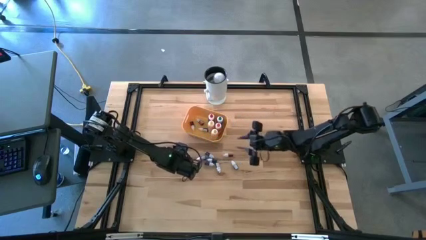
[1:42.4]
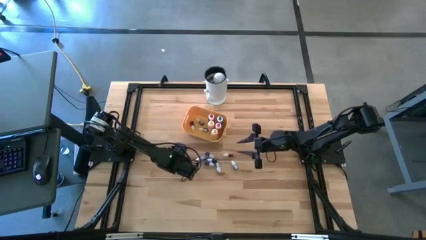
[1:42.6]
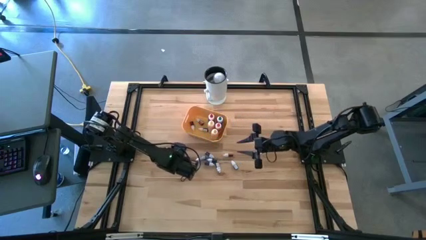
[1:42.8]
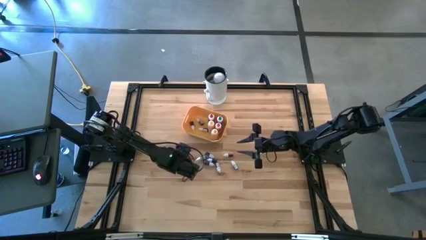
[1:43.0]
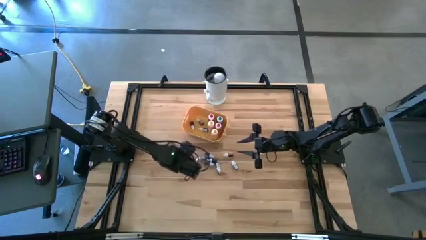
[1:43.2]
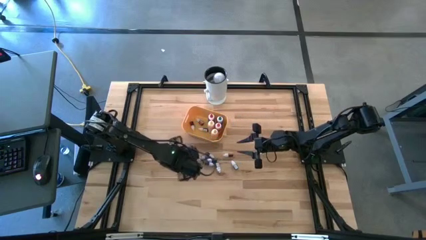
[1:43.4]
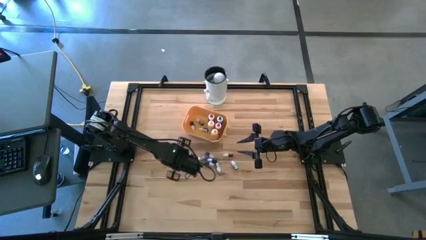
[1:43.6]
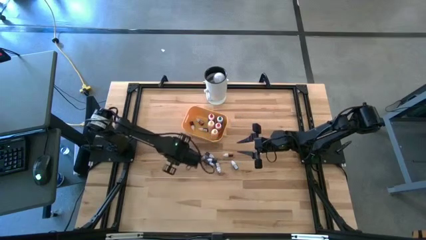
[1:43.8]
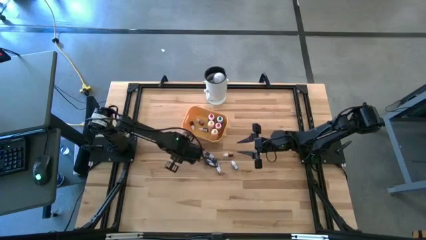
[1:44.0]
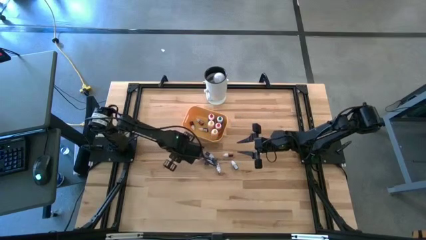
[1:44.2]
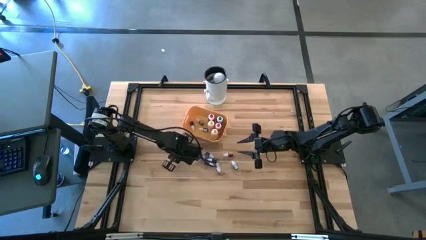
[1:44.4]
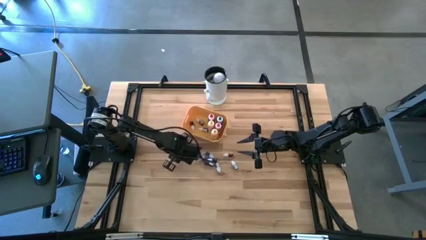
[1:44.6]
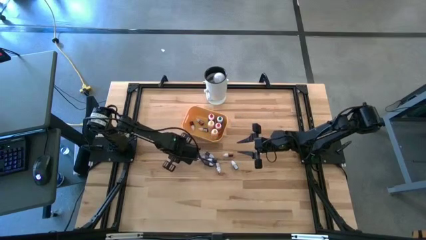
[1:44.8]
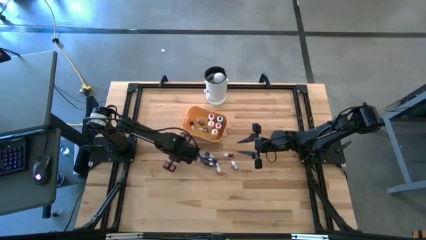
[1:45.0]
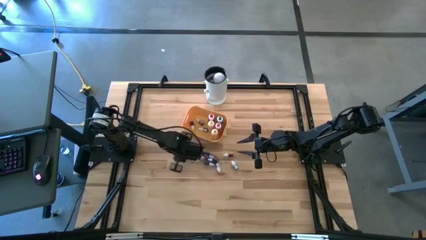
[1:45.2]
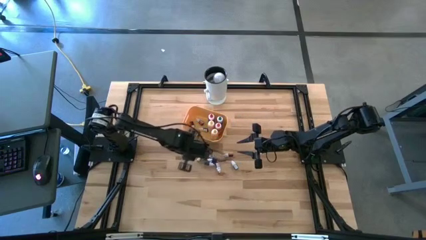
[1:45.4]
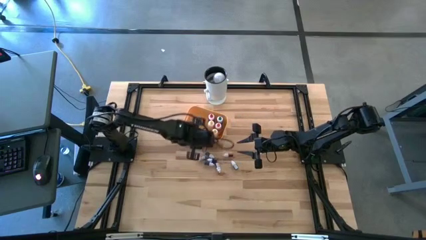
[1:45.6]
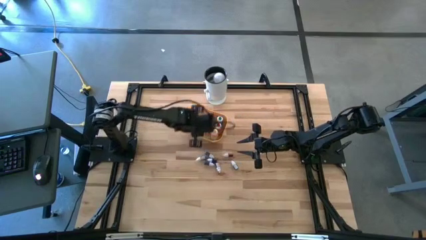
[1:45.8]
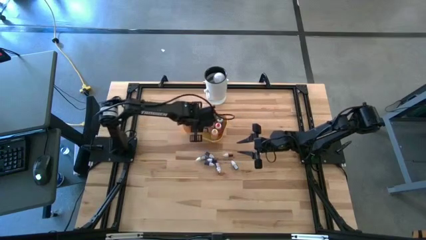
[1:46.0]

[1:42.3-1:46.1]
Task: Pick & Place food coloring
Put the small black food coloring bottle into the yellow bin

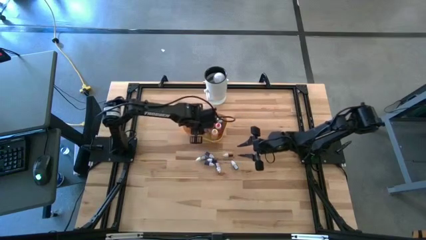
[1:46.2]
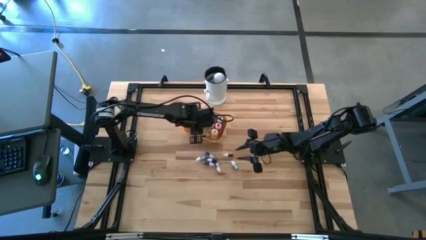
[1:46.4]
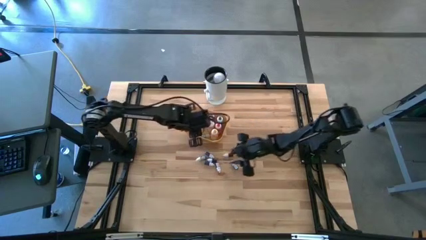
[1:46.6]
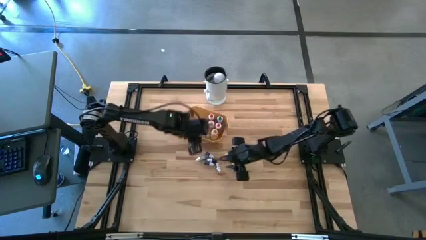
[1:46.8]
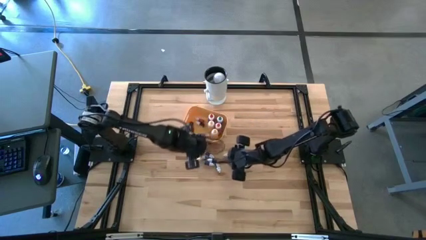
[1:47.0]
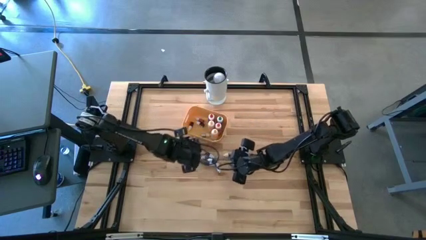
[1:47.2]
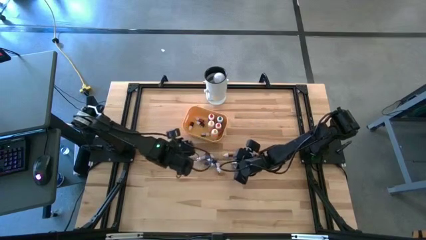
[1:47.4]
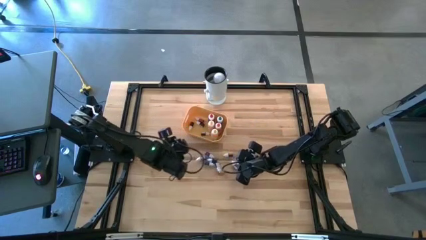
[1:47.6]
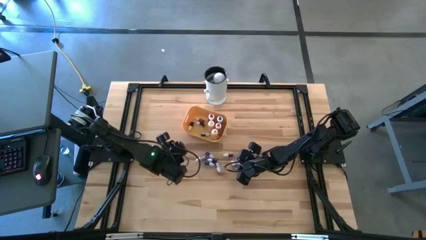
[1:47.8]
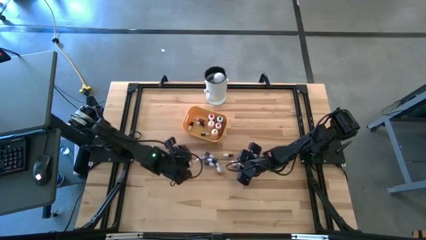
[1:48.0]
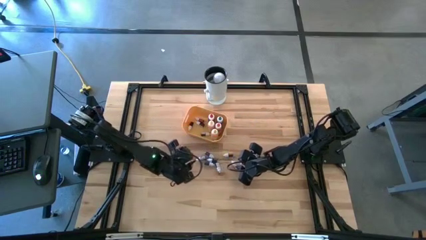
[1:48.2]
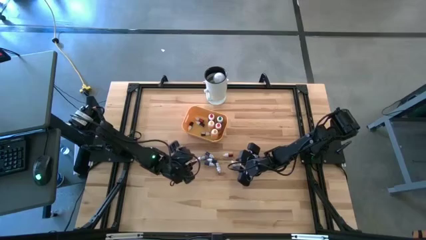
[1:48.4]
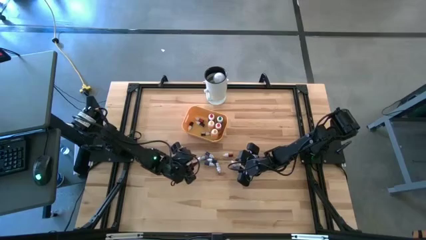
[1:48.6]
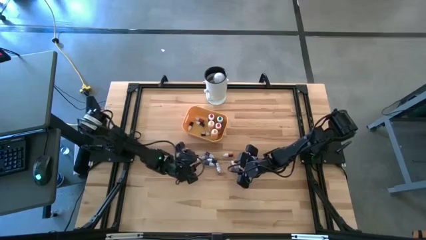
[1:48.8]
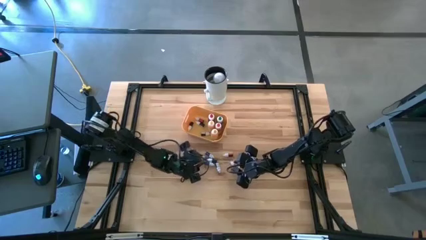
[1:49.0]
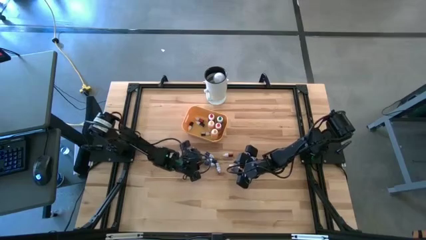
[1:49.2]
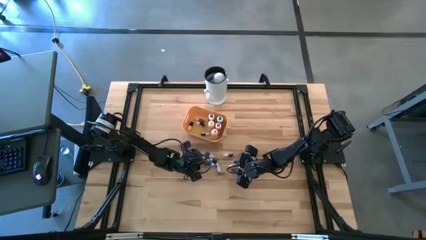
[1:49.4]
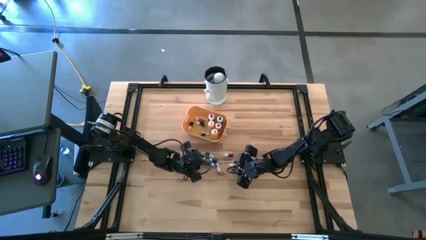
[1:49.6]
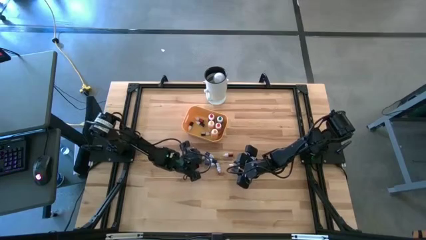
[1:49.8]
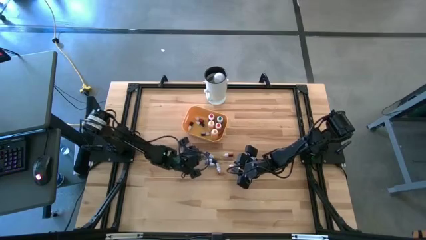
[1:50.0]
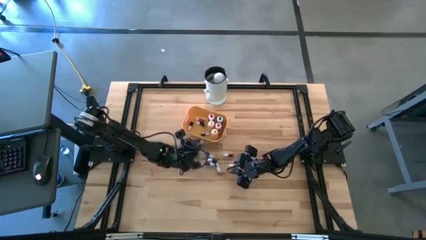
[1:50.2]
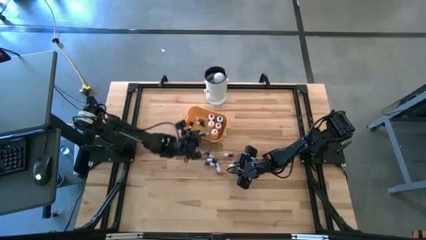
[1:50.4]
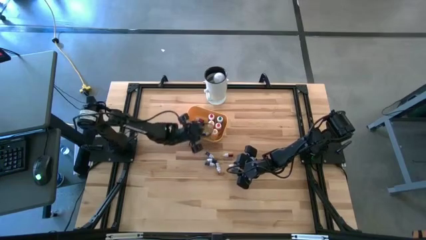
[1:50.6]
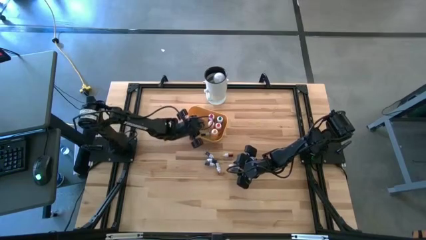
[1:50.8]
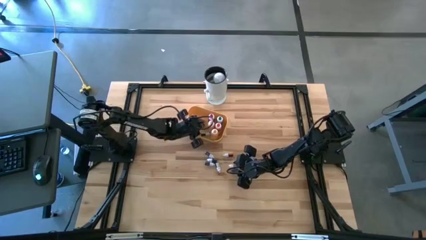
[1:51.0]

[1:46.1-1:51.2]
Put the small green food coloring bottle into the yellow bin

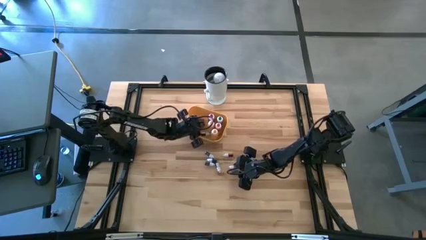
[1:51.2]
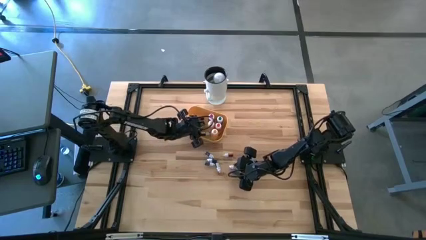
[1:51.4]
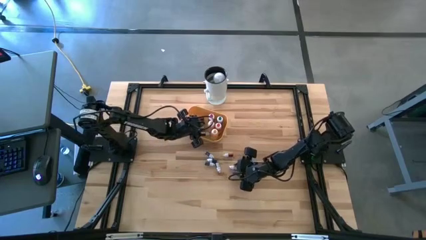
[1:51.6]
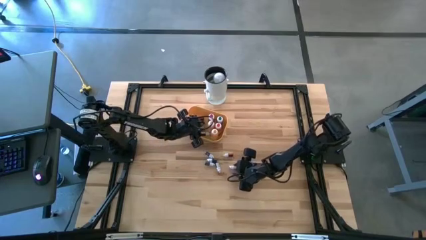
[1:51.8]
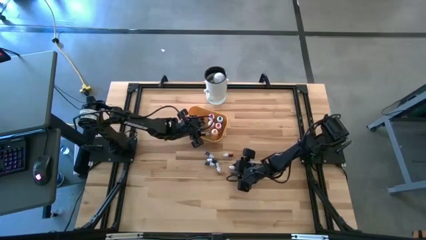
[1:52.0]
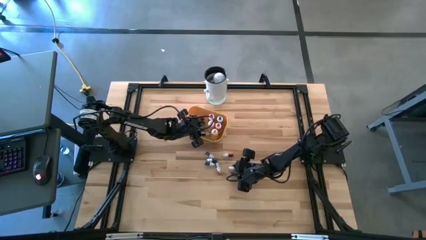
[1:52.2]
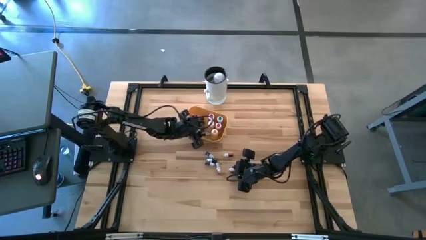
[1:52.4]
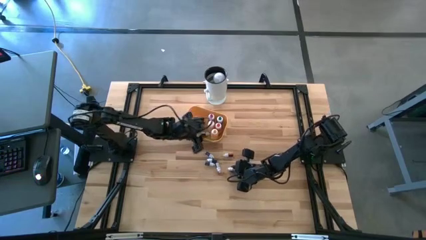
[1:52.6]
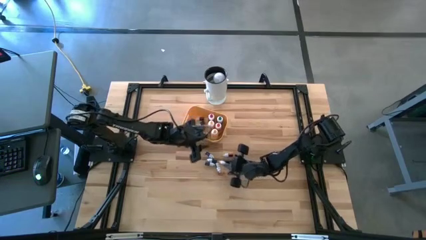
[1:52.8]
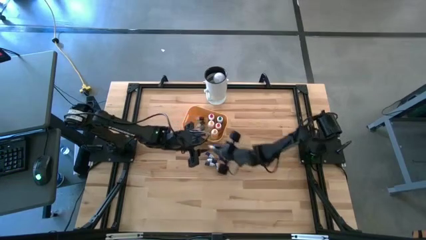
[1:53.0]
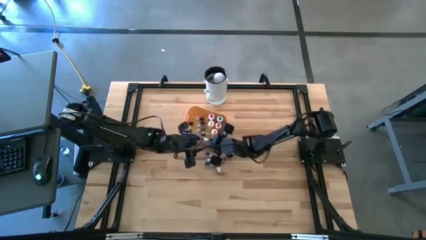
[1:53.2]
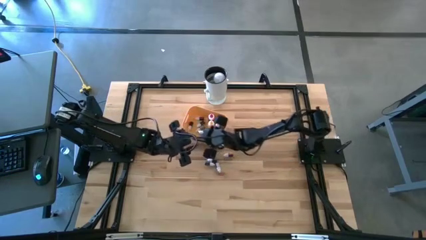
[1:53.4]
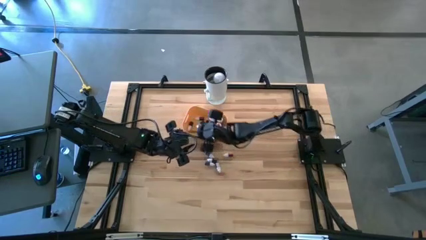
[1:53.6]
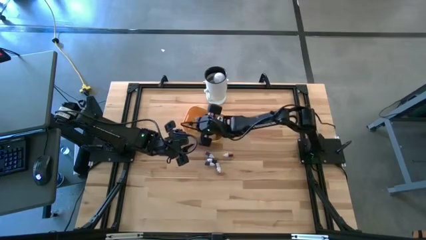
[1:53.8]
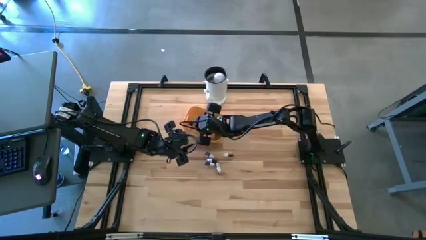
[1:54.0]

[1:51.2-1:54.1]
Put the small red food coloring bottle into the yellow bin

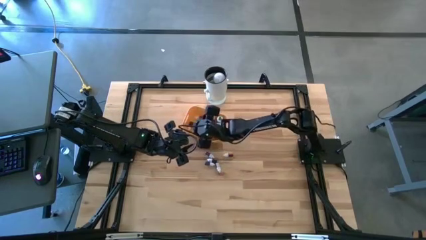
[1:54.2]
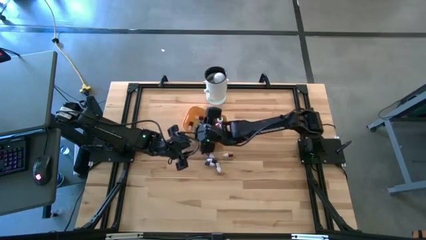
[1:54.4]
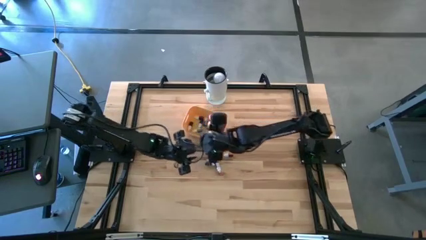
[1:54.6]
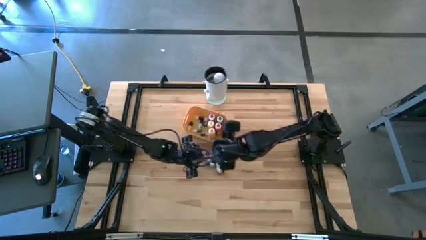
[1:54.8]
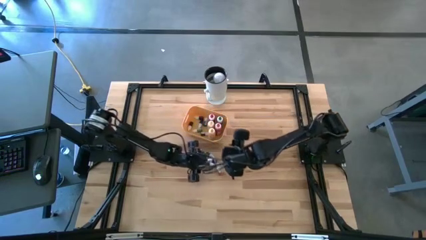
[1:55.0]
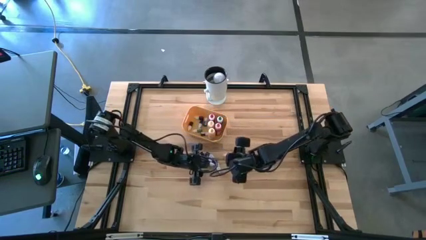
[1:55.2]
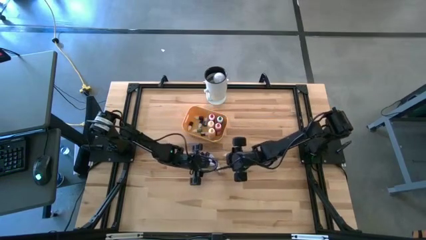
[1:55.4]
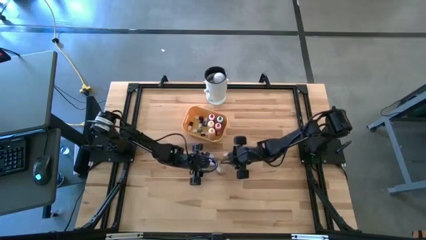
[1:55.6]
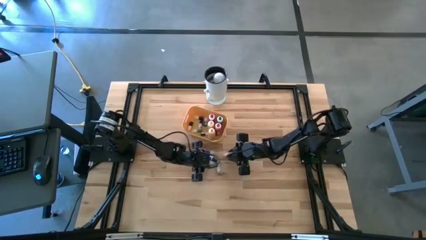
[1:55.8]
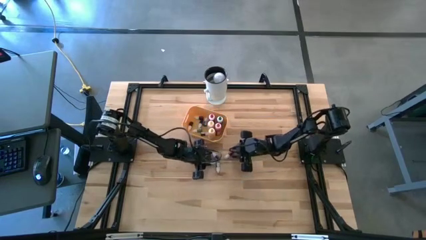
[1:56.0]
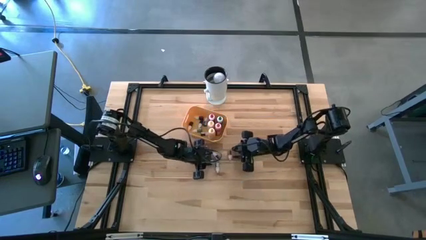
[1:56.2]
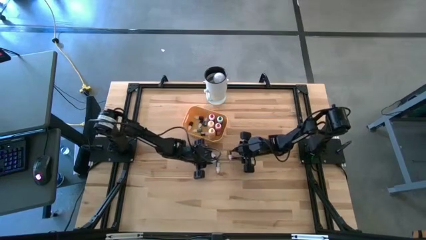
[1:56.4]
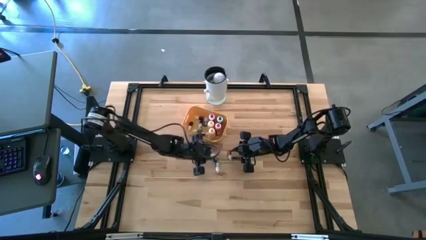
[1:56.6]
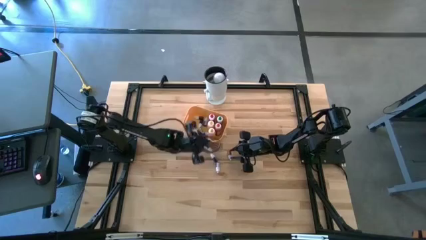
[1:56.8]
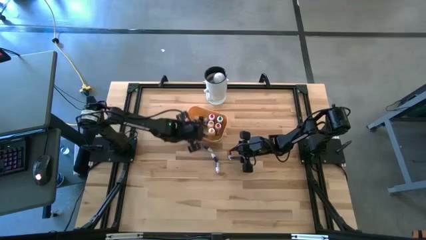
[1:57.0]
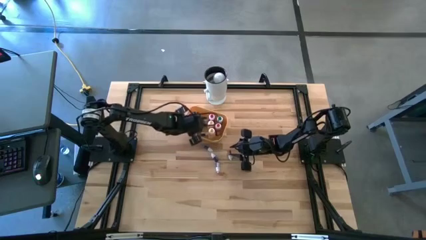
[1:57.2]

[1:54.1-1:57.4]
Put the dark blue small food coloring bottle into the yellow bin

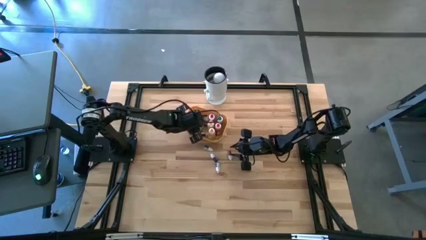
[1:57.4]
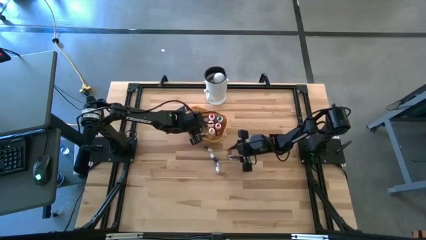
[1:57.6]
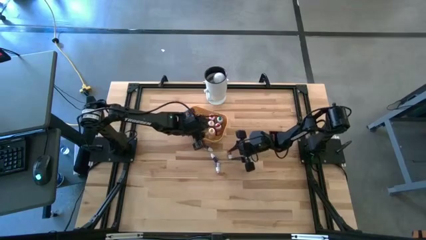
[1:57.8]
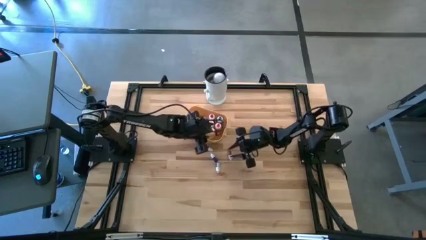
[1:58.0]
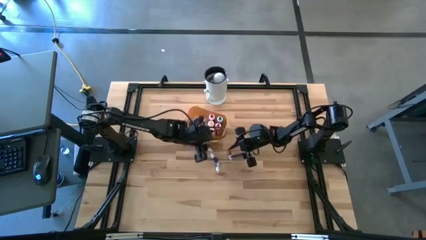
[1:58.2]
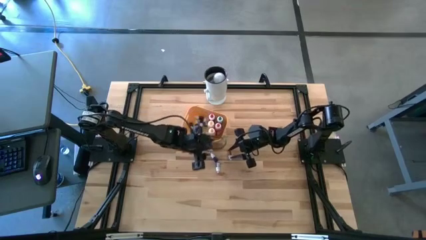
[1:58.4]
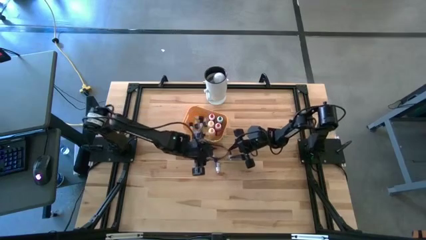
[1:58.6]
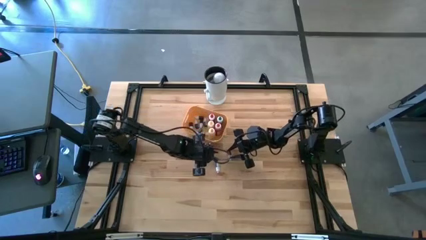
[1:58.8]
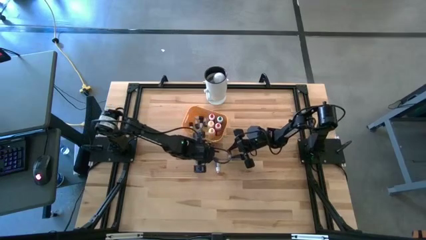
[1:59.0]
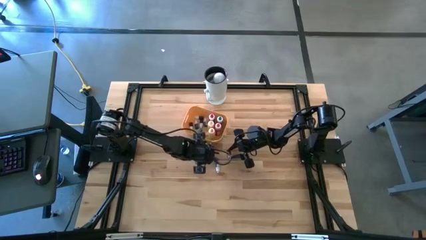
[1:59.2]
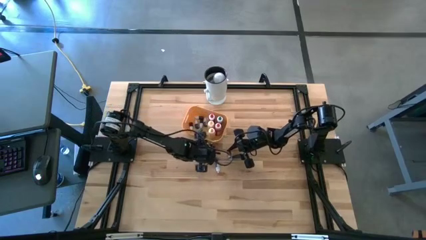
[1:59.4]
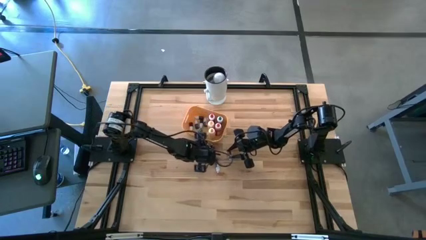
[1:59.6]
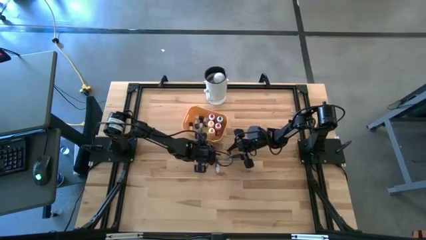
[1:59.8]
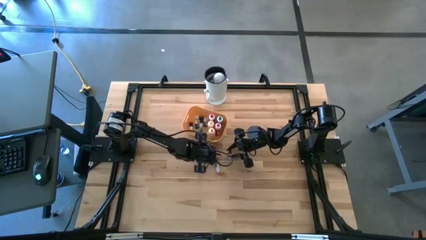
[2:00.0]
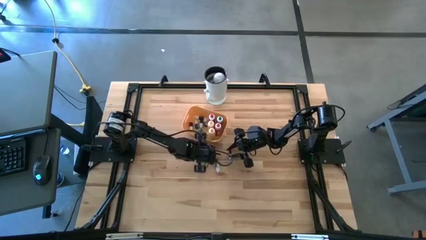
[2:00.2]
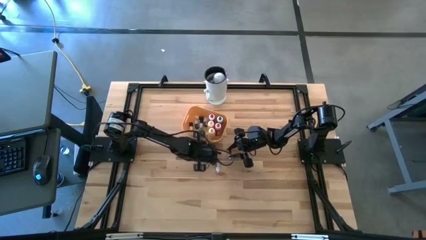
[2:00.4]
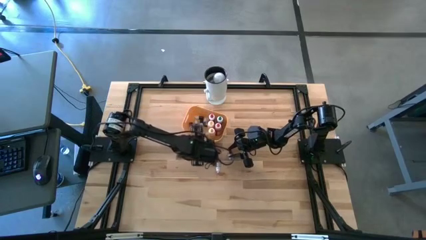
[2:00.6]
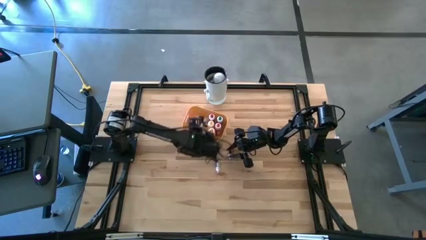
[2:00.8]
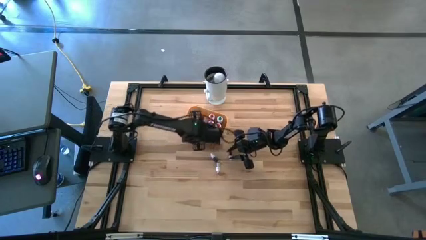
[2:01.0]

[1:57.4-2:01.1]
Put the dark blue small food coloring bottle into the yellow bin
